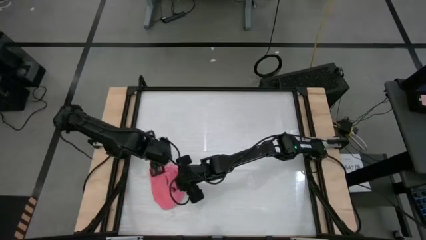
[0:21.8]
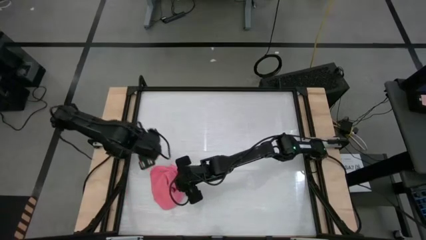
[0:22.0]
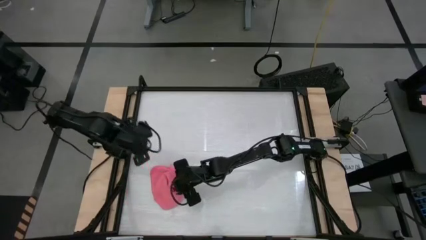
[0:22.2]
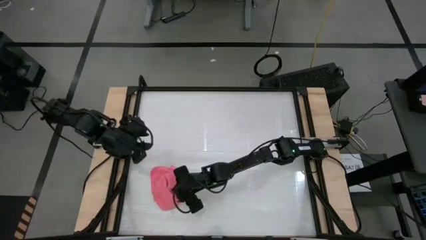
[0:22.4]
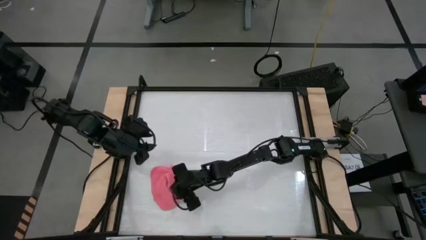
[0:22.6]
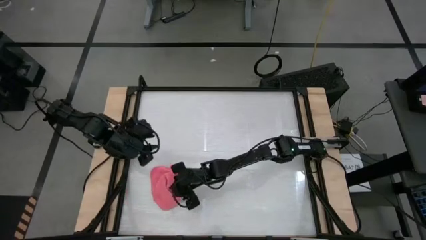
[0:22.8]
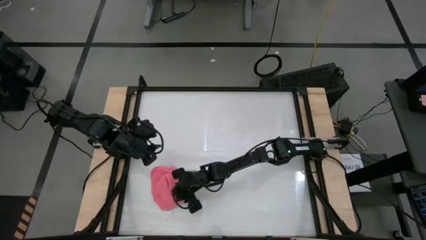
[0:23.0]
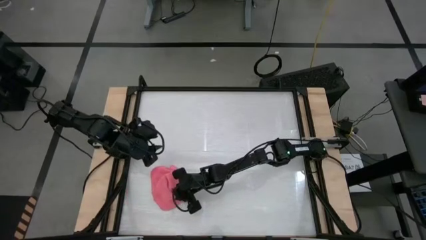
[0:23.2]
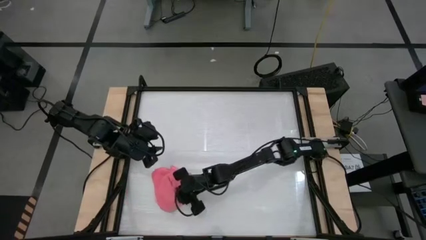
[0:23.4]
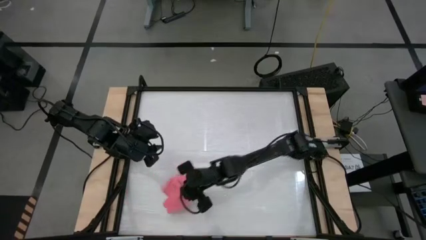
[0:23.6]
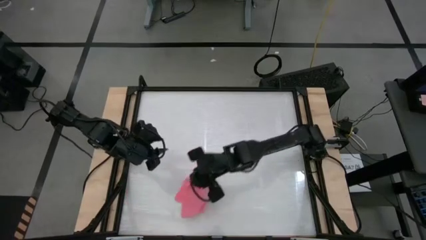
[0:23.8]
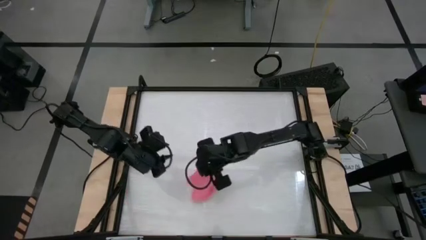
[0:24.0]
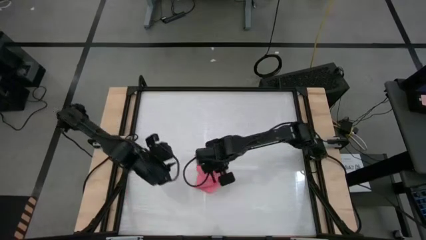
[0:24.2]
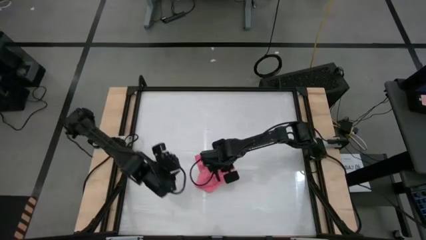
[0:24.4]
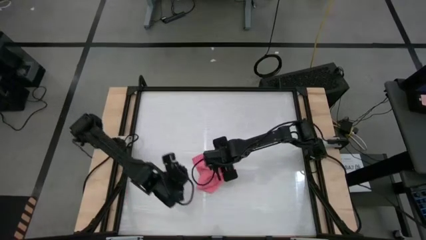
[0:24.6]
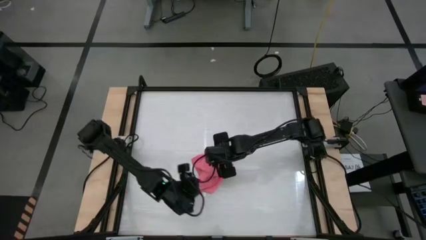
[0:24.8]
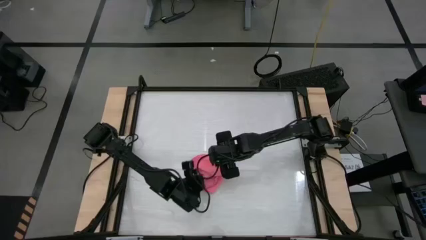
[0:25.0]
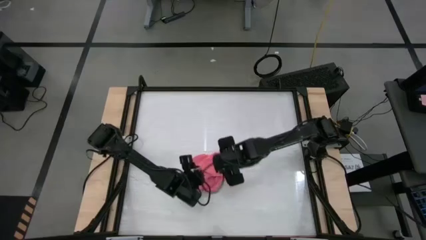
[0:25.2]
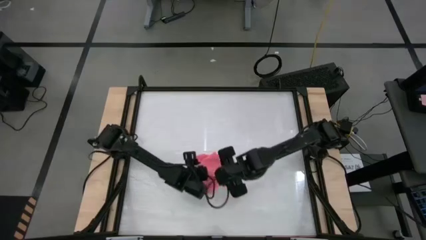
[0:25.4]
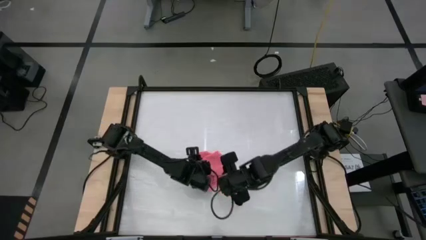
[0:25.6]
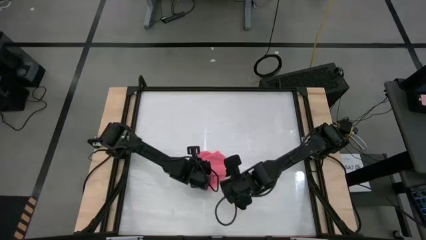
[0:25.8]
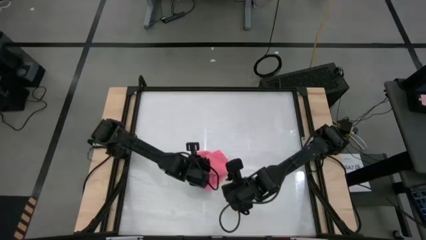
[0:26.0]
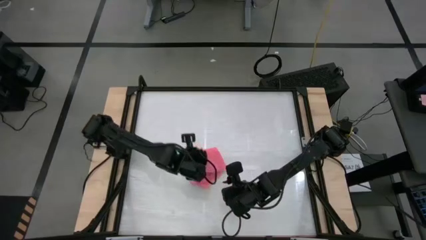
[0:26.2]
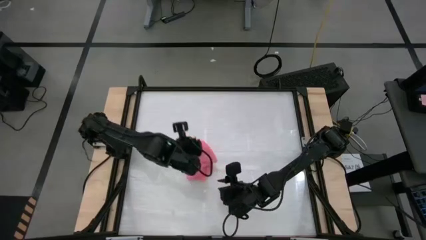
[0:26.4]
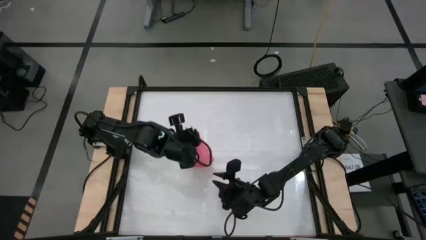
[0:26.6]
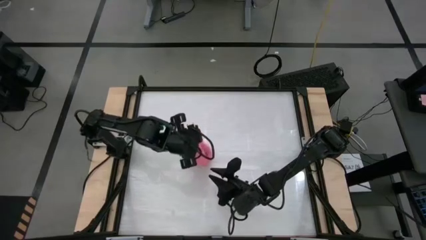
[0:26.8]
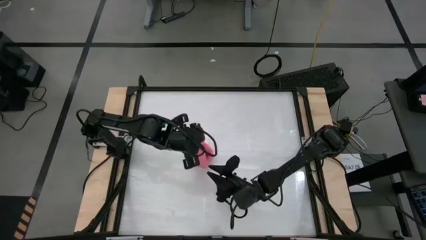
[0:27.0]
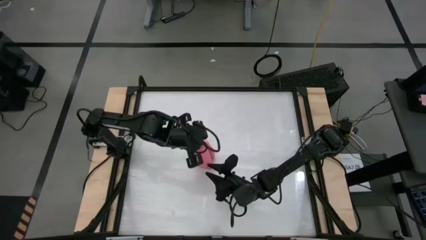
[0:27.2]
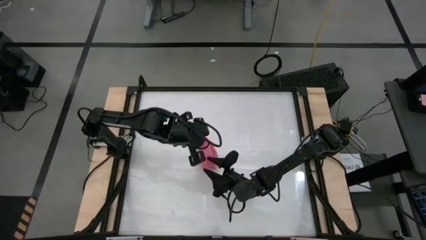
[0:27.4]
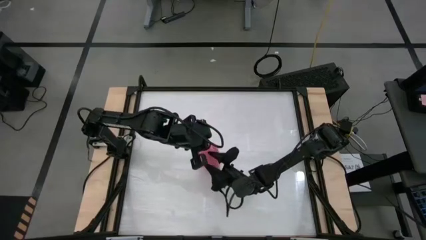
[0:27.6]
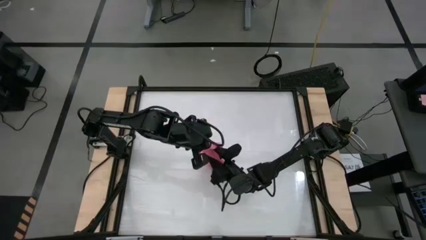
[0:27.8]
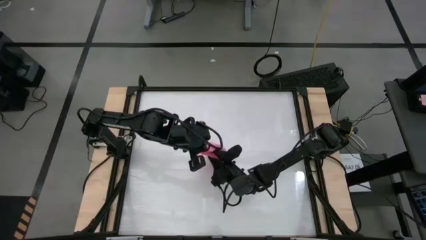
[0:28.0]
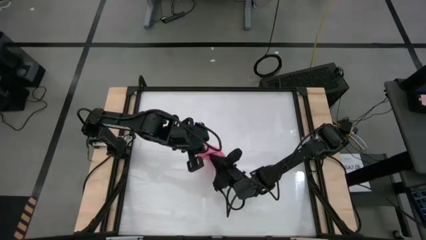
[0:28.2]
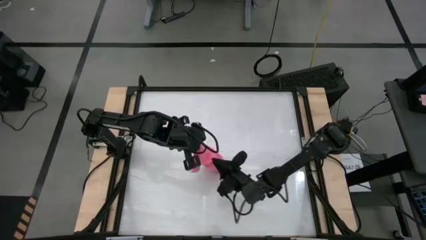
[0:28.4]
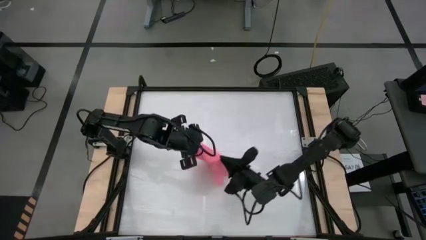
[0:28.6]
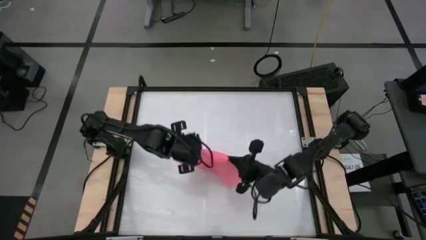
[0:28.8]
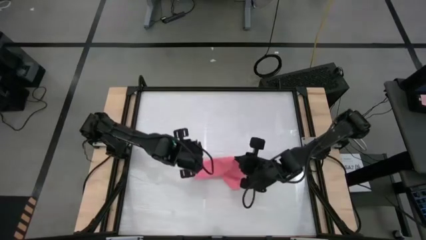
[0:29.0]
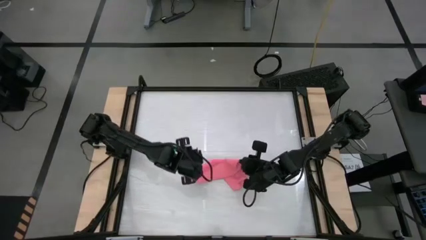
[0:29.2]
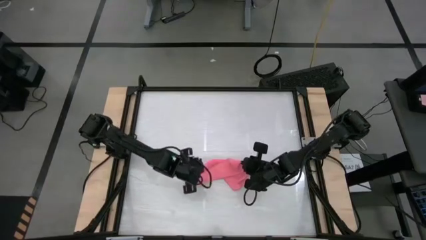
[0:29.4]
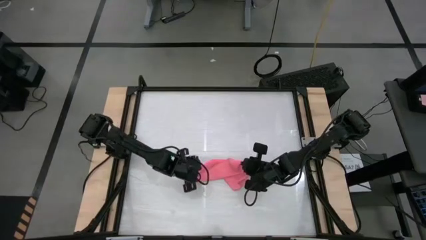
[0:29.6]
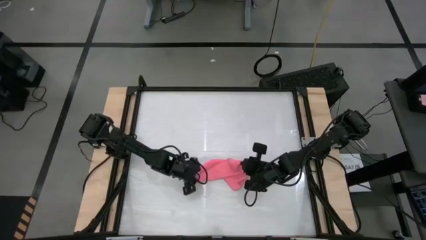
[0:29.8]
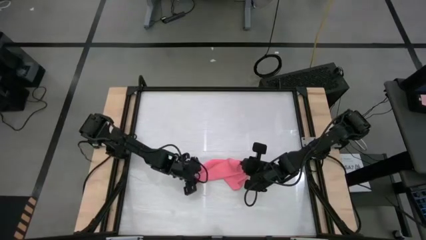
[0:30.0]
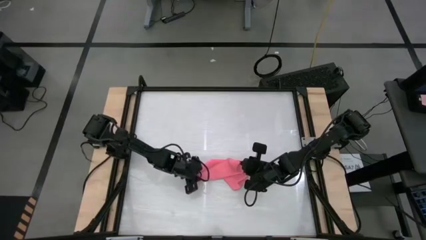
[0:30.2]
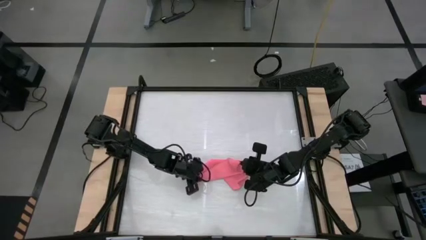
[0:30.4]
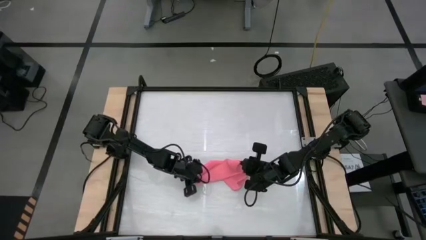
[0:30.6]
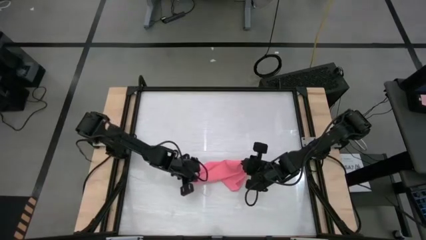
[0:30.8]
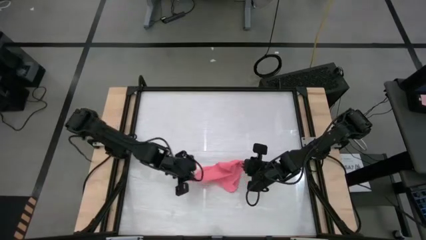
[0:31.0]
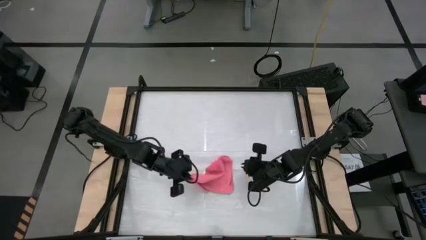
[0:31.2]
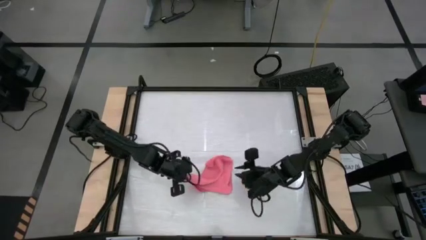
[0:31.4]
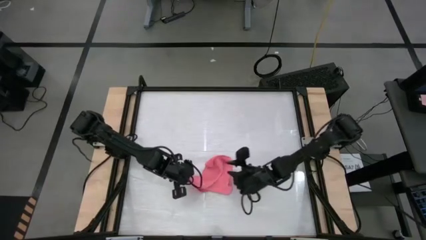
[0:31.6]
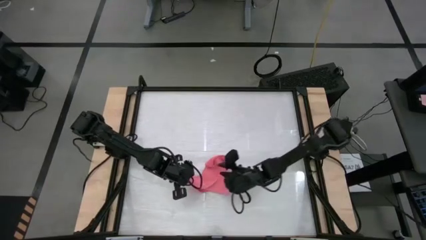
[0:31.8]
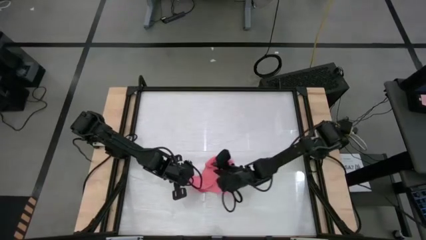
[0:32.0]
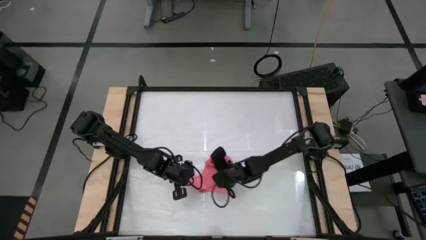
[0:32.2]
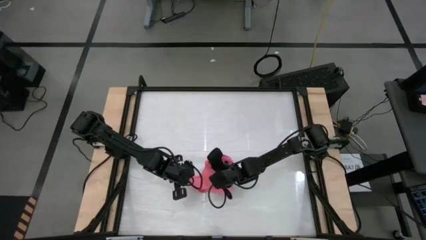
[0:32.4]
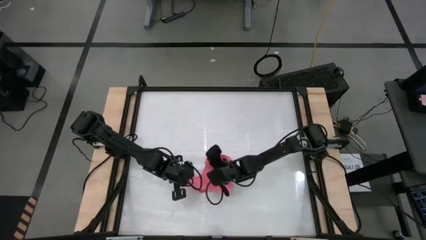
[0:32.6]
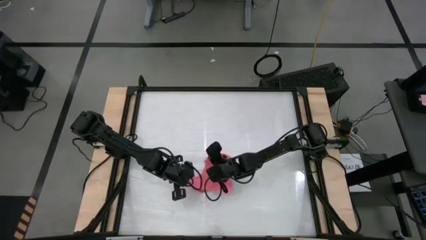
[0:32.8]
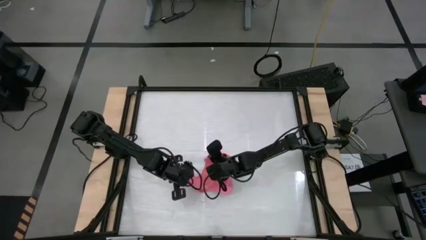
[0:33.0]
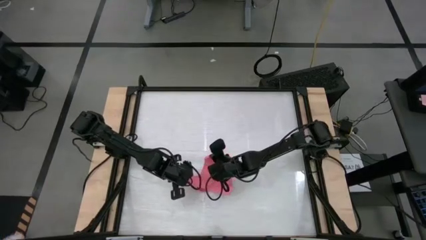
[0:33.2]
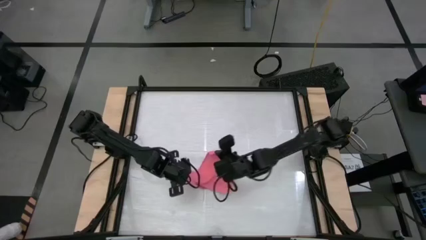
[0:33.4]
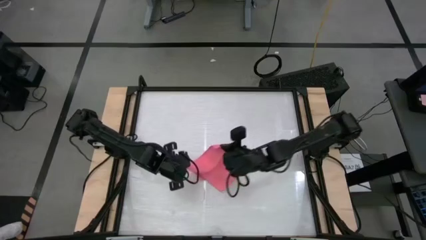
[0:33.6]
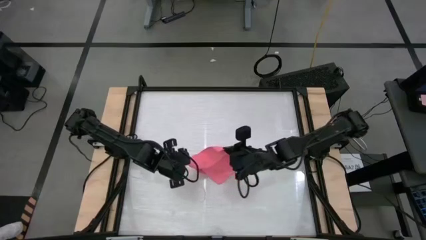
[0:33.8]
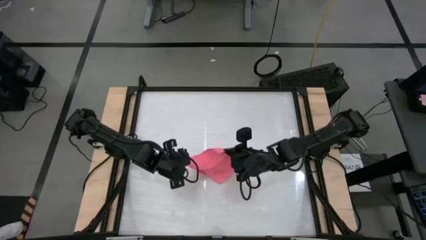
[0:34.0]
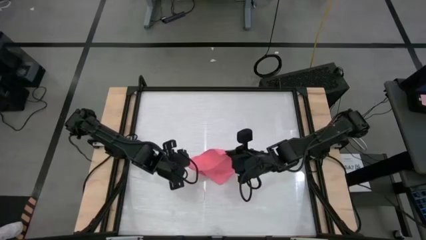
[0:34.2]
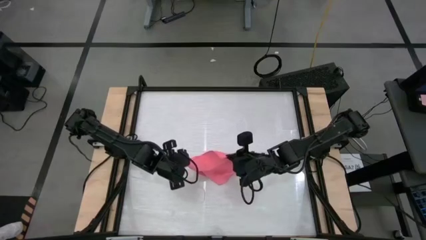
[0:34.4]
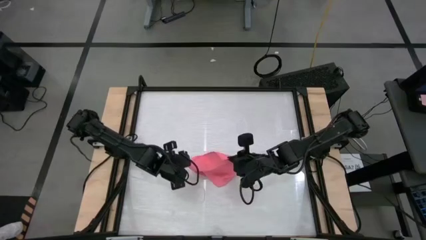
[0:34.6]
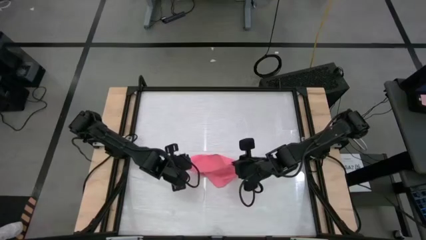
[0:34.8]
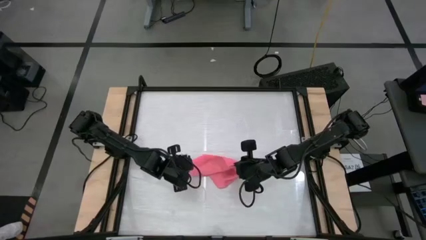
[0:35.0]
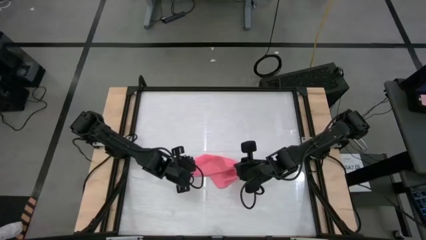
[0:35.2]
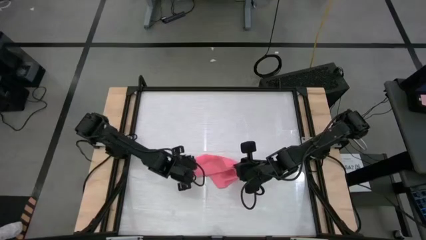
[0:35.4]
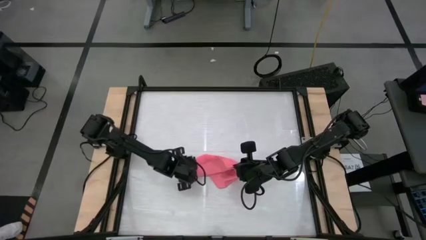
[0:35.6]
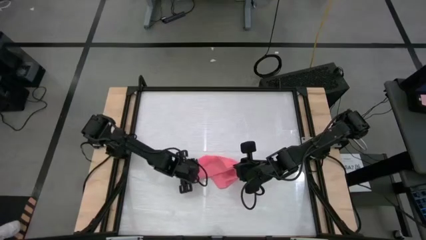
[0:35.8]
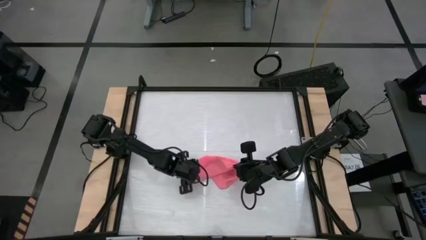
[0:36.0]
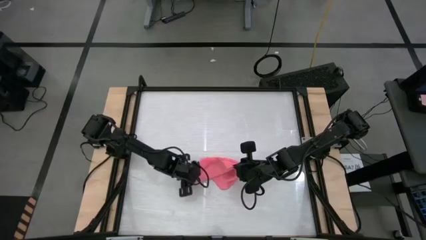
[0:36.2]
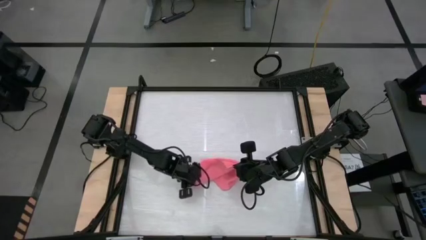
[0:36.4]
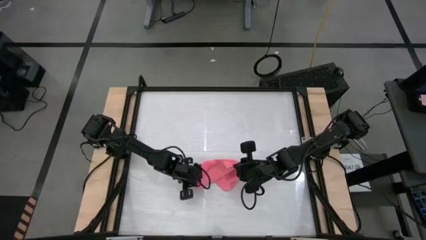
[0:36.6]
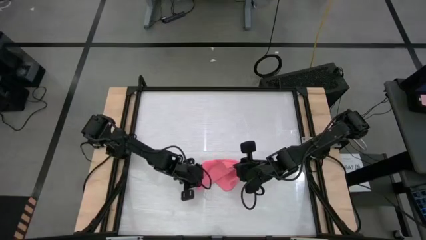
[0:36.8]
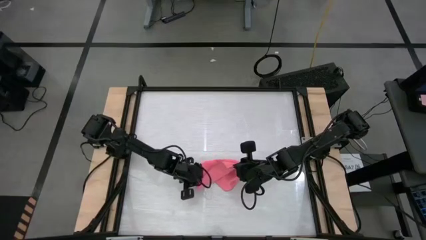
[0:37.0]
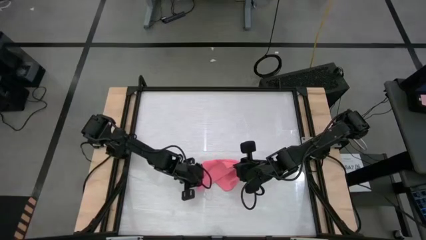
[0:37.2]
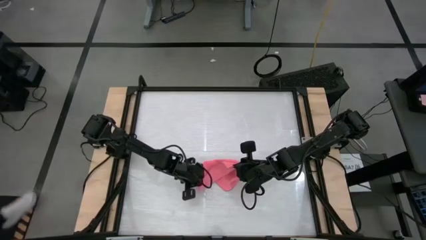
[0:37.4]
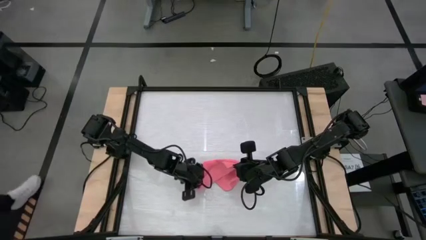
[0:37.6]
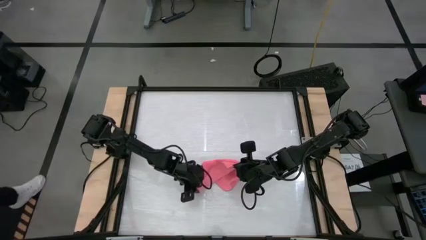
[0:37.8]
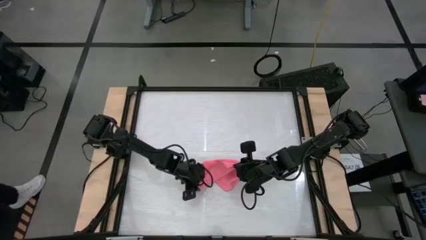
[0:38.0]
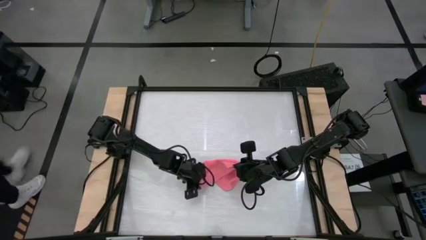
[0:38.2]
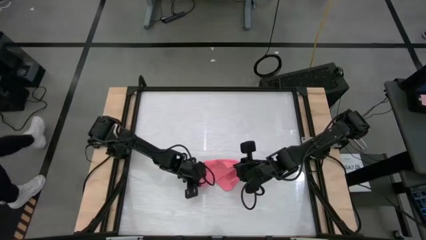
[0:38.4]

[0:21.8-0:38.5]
Task: Roll towel
Fold the pink towel
